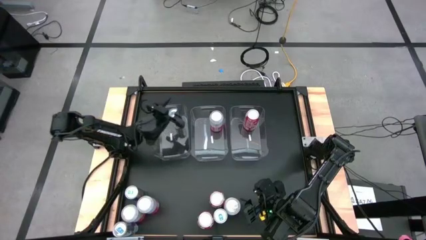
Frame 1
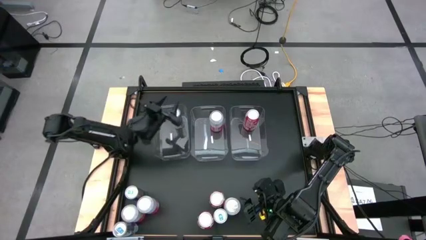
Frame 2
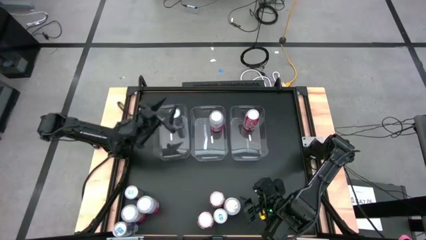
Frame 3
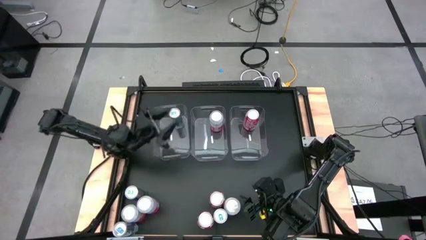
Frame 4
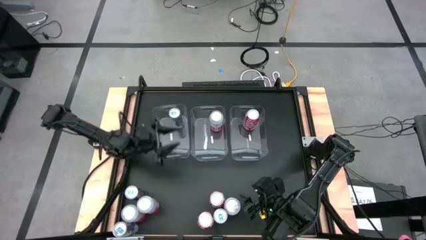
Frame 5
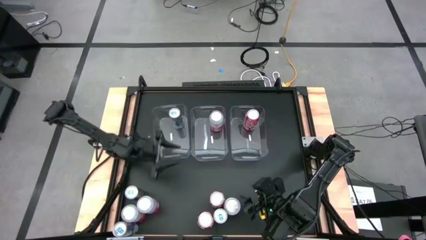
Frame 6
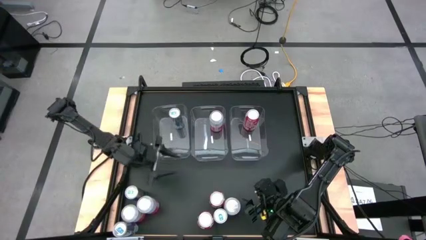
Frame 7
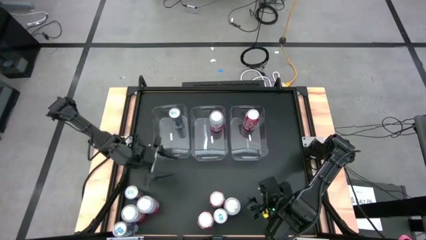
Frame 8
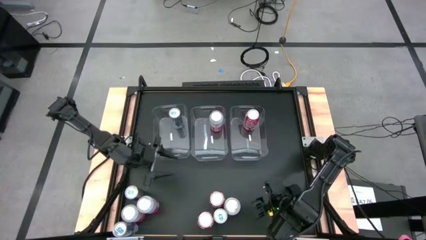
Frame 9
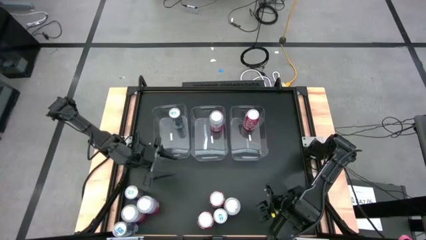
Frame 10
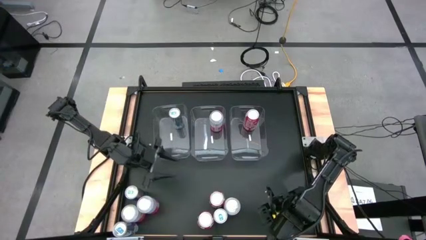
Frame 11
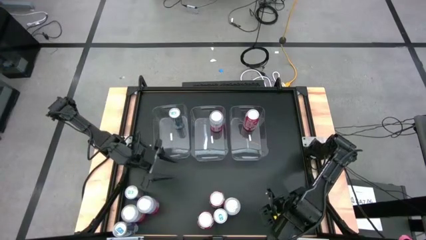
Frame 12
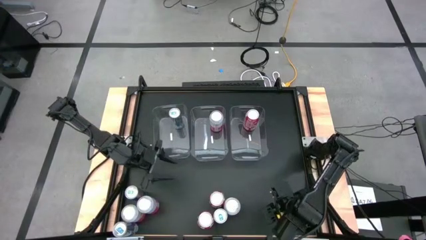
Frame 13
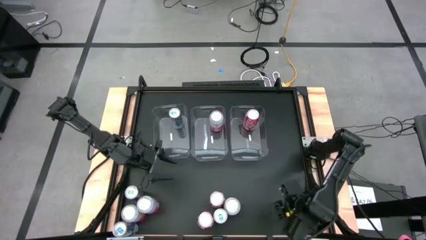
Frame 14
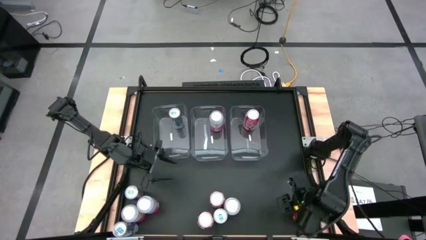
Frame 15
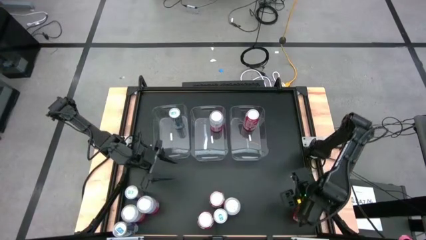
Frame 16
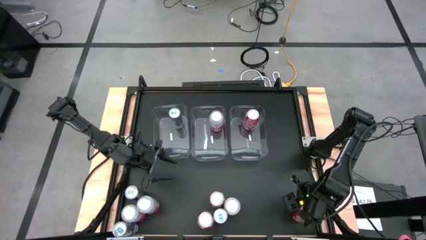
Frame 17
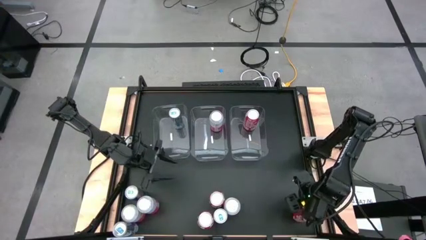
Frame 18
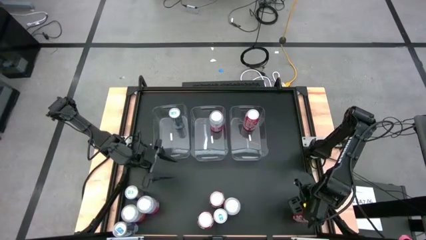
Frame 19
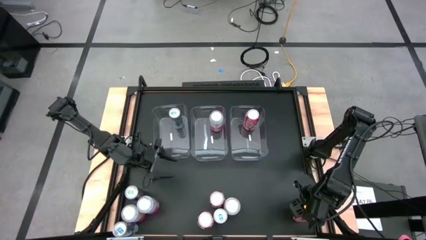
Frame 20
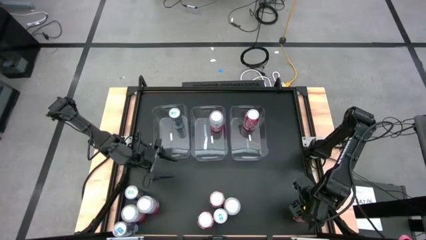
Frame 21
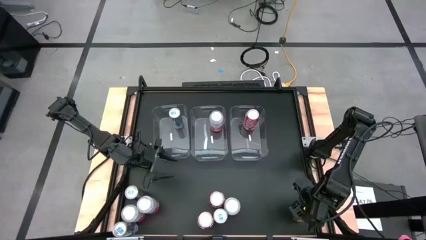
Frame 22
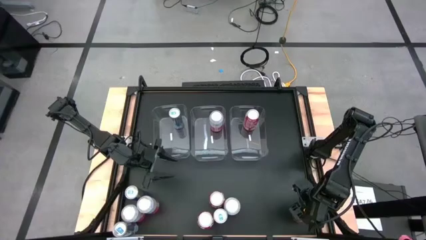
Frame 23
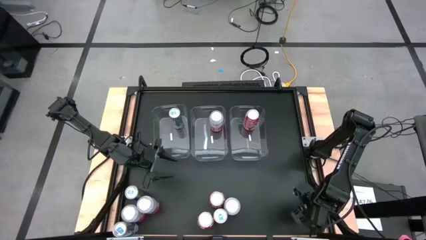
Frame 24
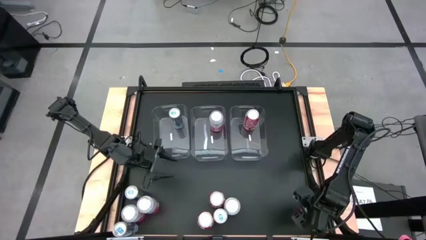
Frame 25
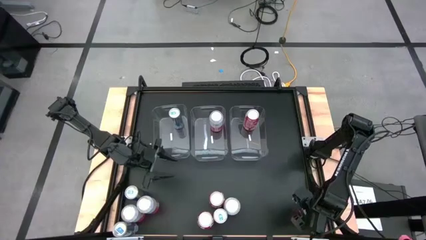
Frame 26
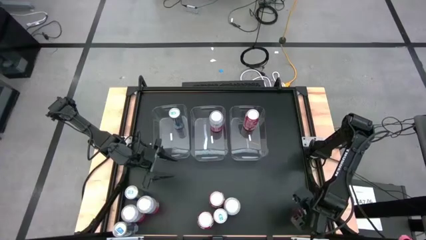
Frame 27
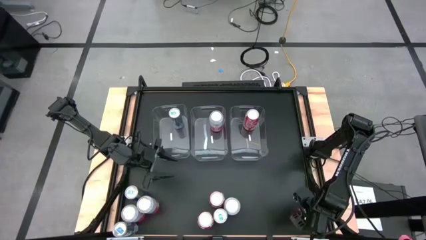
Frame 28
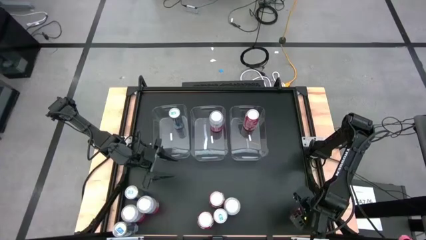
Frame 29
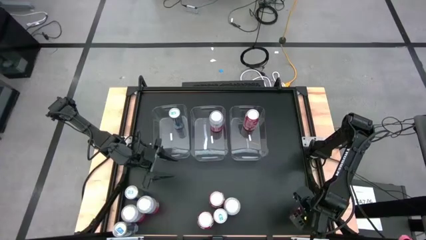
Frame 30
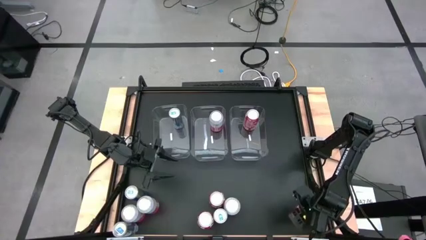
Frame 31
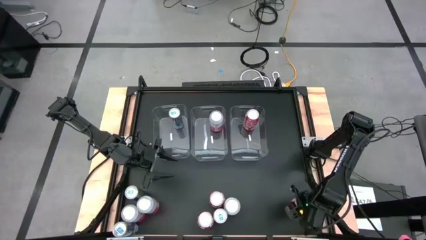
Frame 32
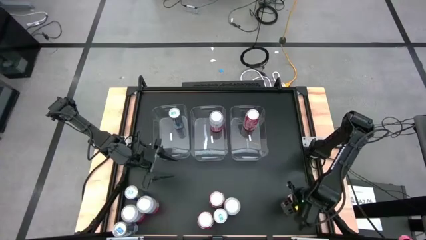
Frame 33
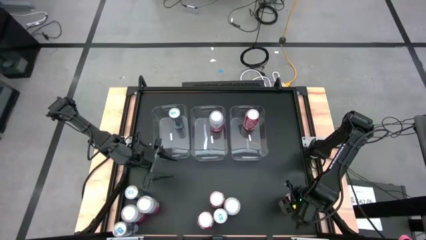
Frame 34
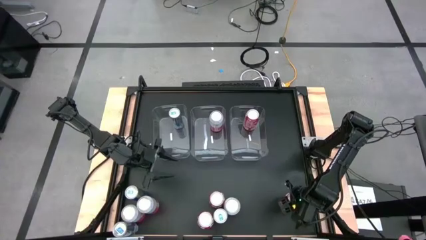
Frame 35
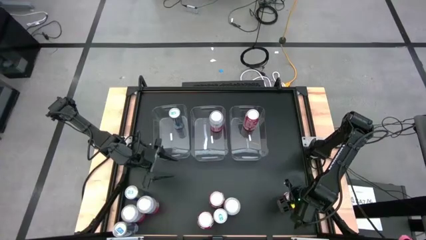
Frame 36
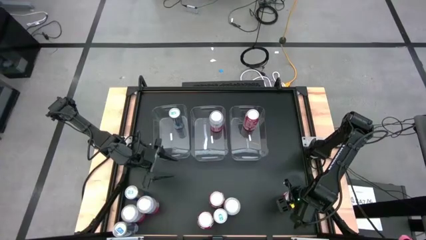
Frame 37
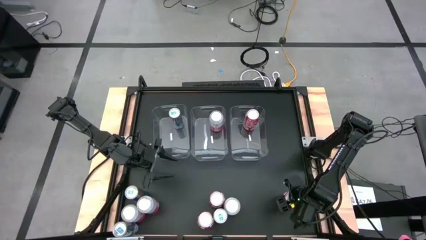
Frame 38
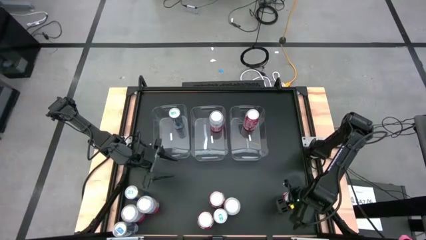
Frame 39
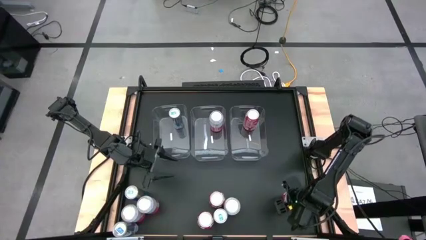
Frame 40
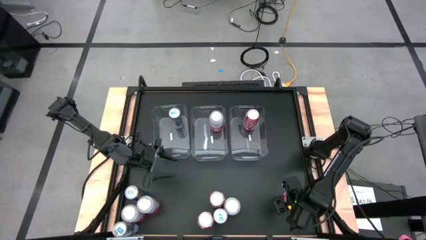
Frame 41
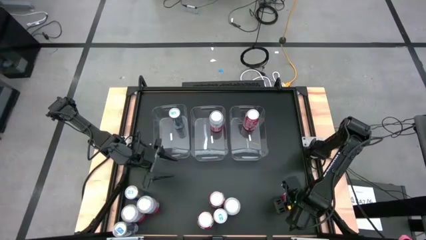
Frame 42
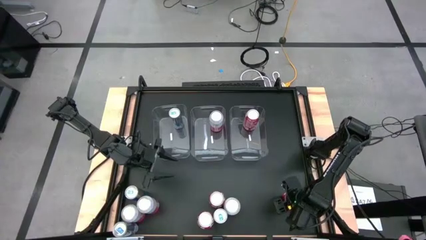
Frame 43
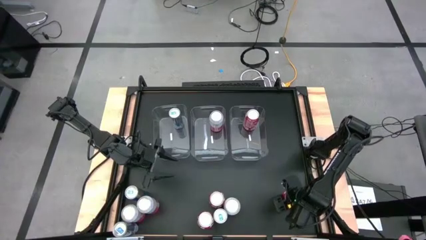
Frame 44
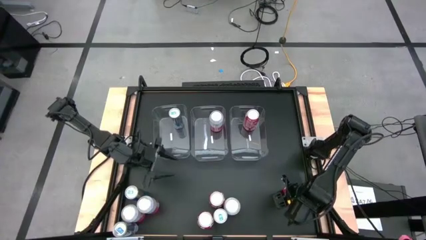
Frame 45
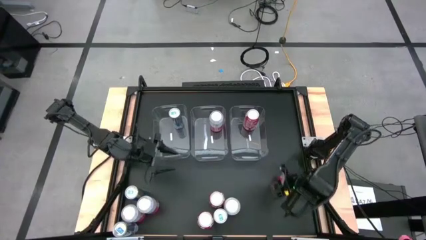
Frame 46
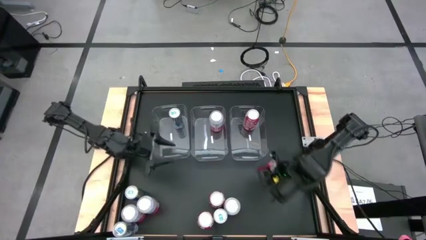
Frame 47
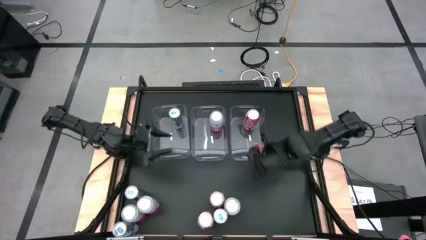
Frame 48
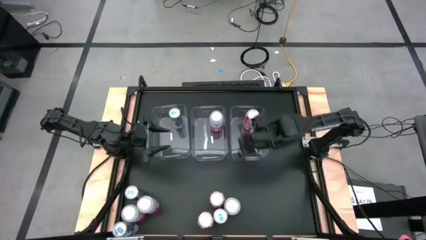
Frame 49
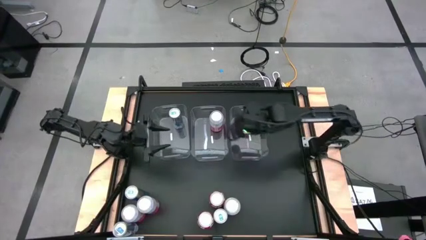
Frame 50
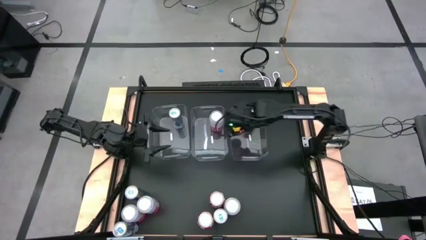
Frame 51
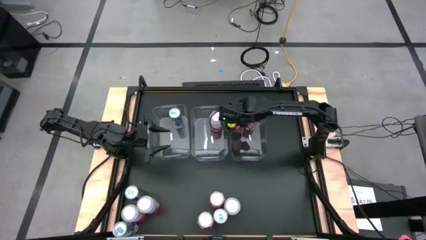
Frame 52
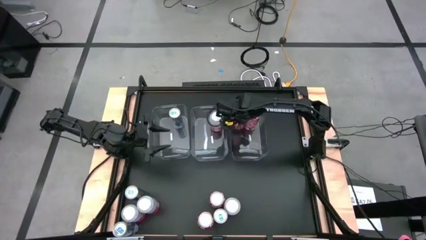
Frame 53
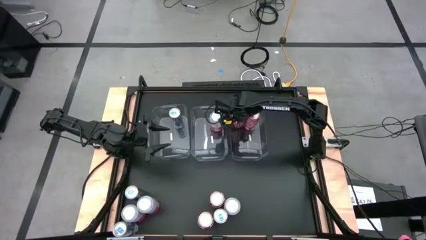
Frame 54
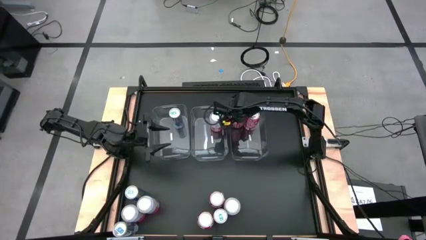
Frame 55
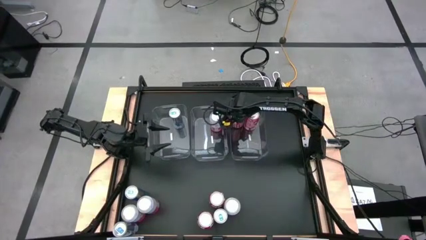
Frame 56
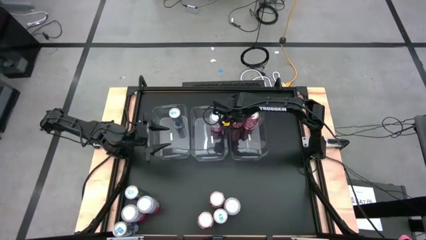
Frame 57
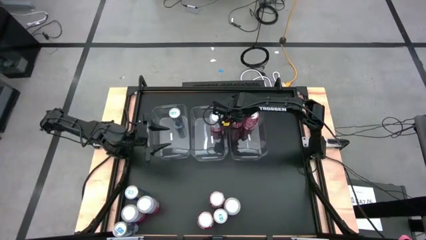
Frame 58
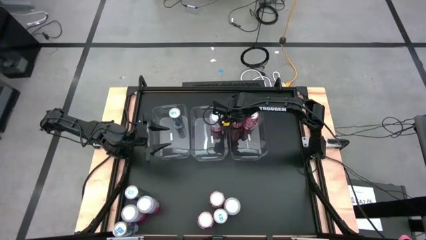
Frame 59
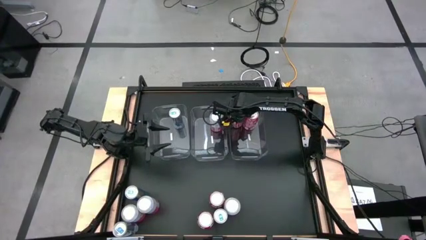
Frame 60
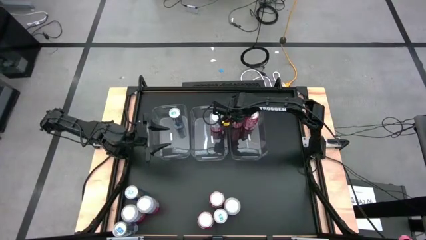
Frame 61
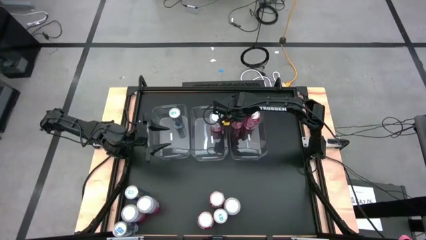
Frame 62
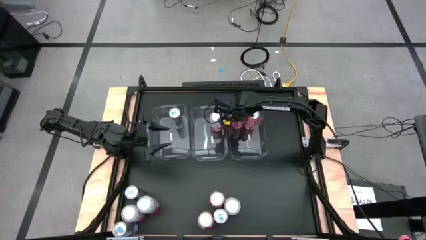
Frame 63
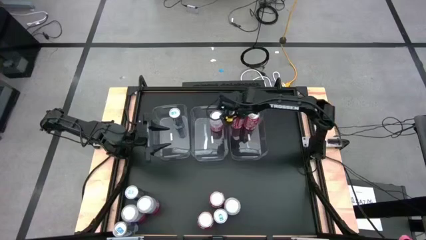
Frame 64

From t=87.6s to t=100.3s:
Task: Sort soda cans
Put the red-white soda can into the right transparent bin

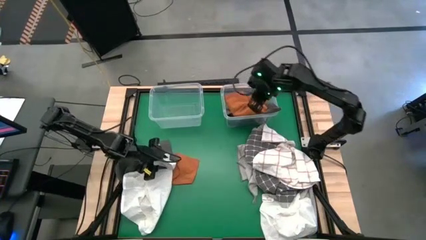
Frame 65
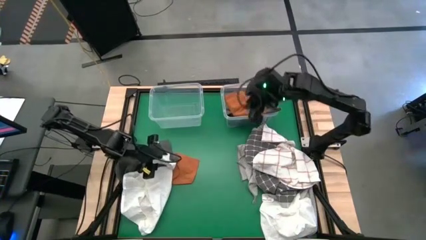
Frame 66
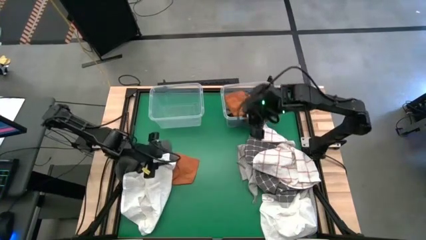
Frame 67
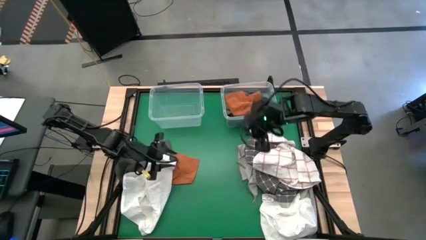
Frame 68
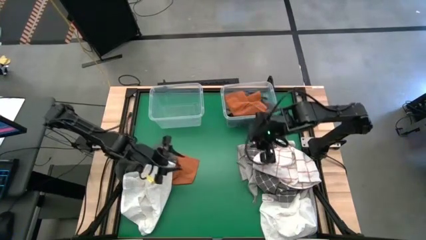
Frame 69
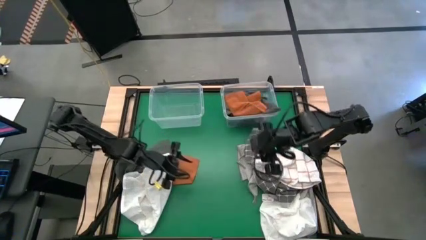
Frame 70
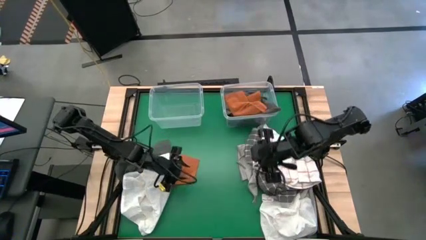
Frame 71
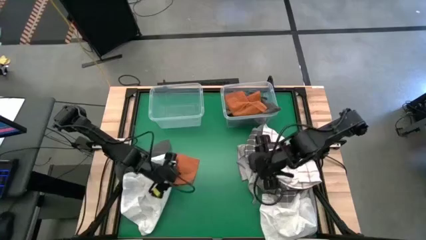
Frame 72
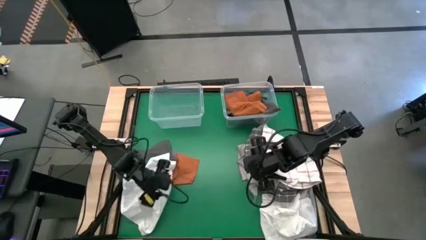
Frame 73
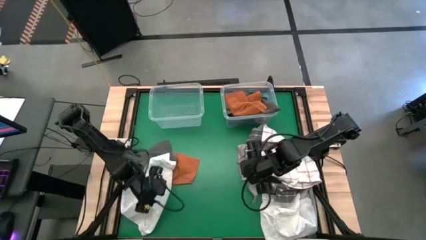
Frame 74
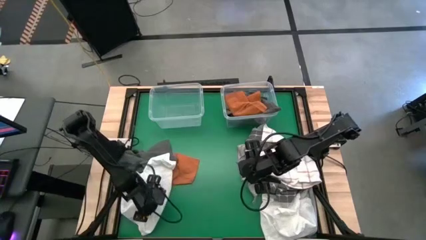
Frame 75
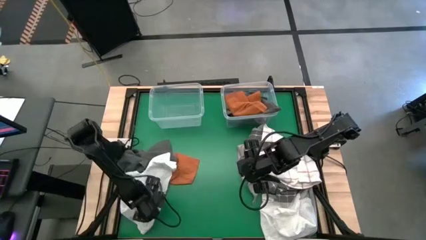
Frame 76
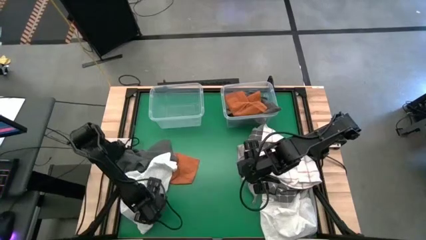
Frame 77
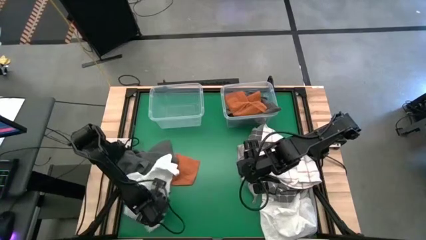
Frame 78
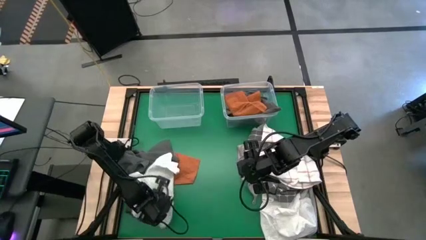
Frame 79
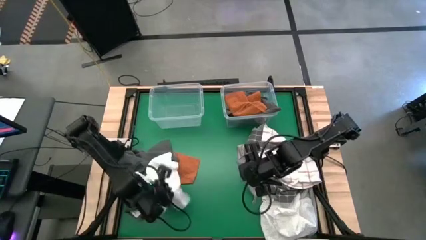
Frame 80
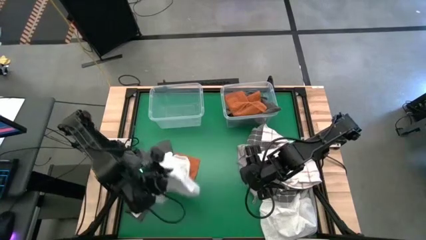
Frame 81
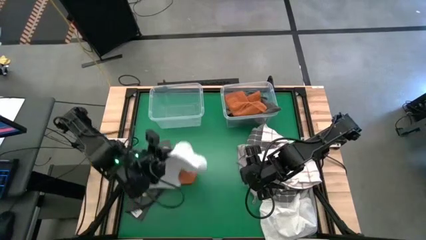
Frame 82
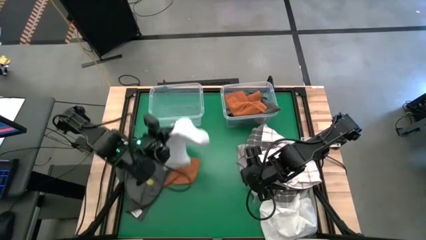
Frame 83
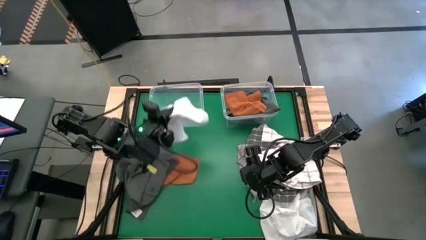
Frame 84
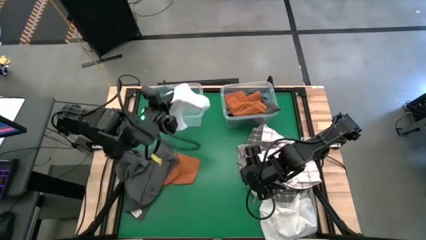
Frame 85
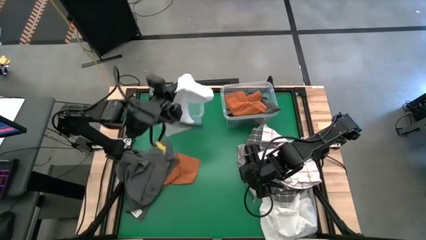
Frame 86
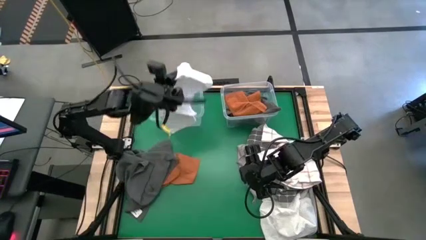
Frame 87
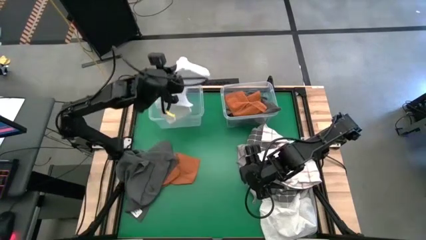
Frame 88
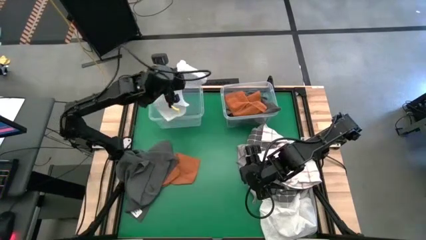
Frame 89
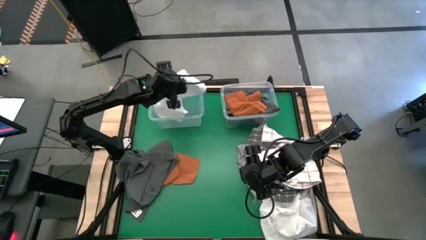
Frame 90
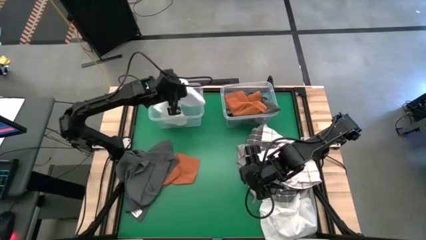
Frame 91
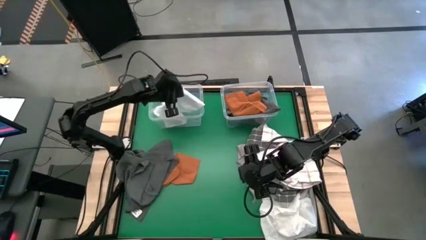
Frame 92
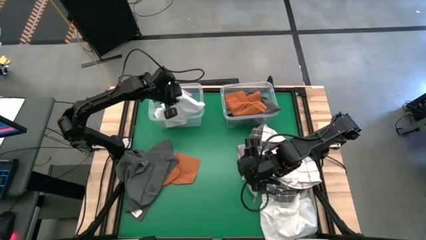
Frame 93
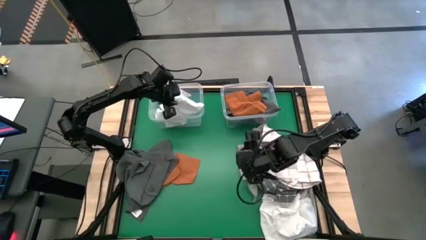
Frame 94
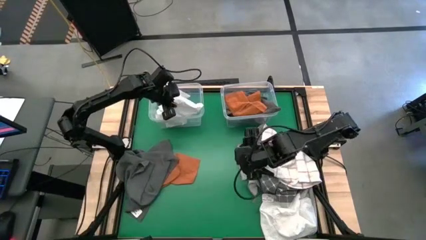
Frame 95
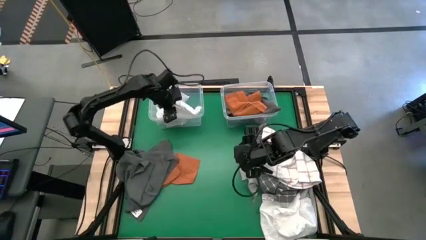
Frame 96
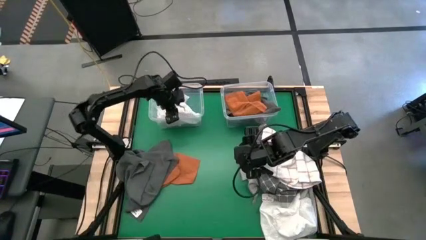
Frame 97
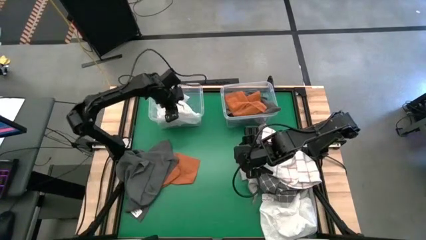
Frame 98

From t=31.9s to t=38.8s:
Task: Sort towels by color in basket
Put the left white towel into the left transparent bin
